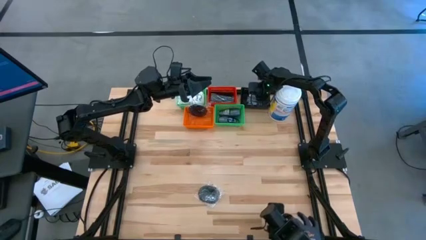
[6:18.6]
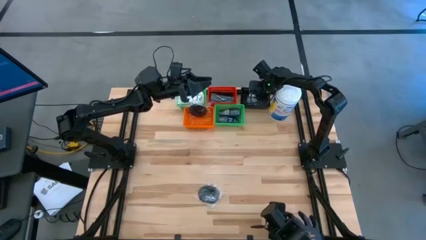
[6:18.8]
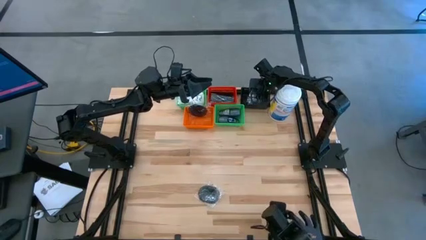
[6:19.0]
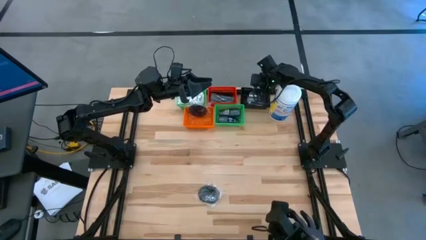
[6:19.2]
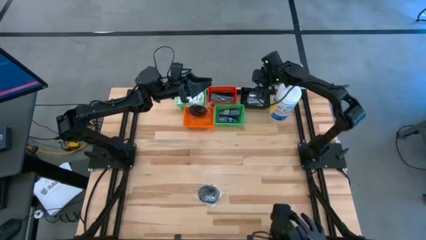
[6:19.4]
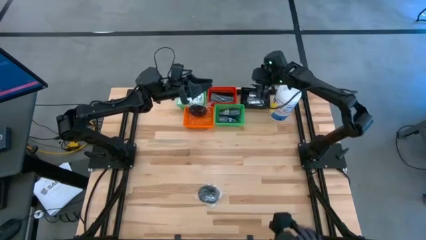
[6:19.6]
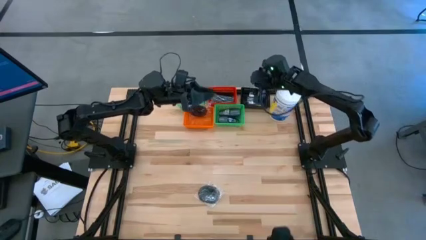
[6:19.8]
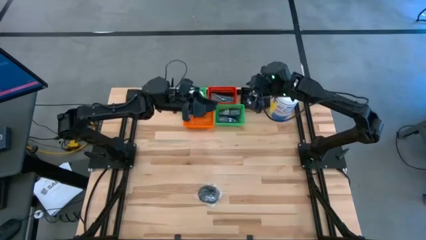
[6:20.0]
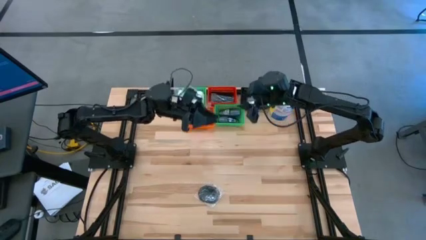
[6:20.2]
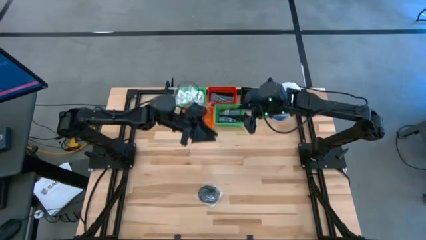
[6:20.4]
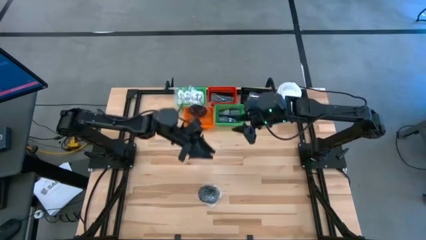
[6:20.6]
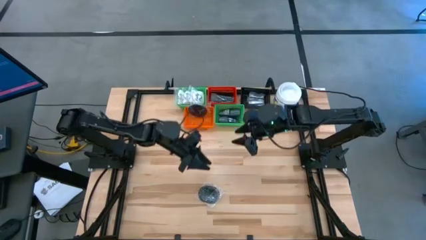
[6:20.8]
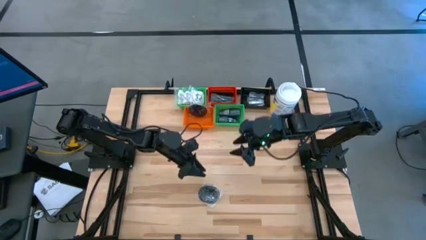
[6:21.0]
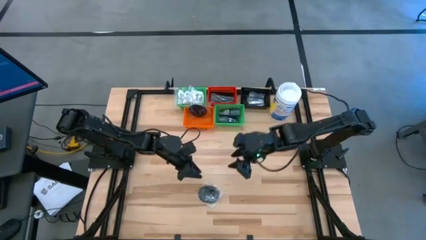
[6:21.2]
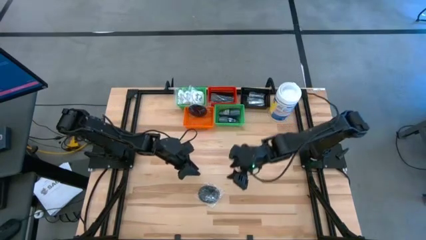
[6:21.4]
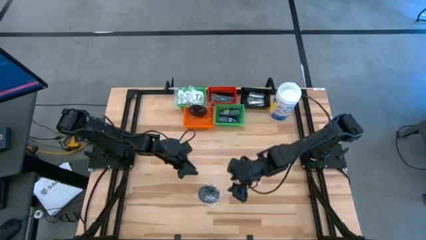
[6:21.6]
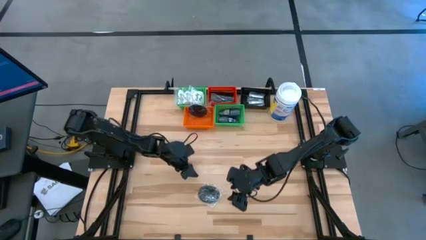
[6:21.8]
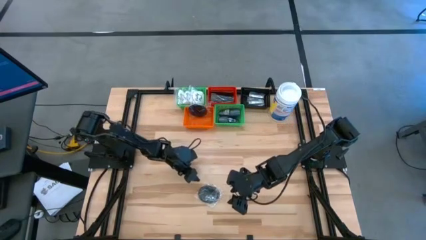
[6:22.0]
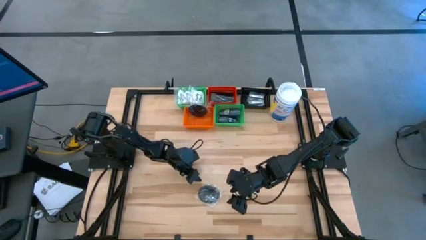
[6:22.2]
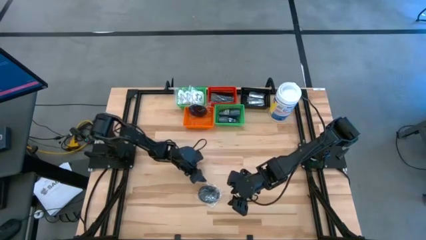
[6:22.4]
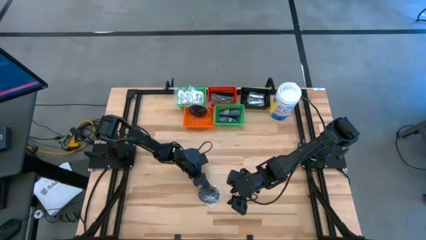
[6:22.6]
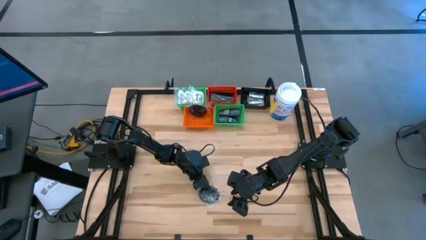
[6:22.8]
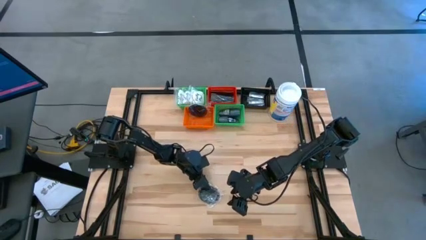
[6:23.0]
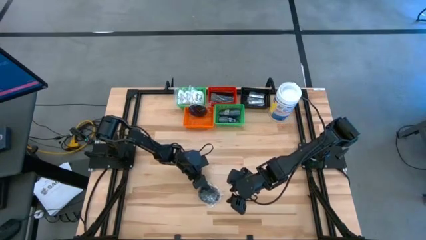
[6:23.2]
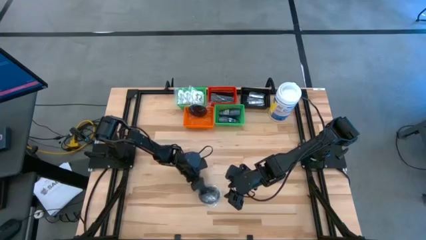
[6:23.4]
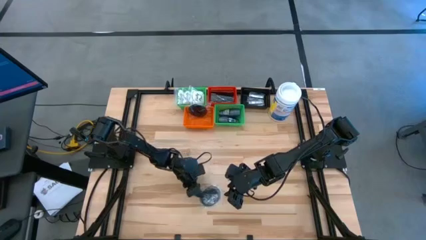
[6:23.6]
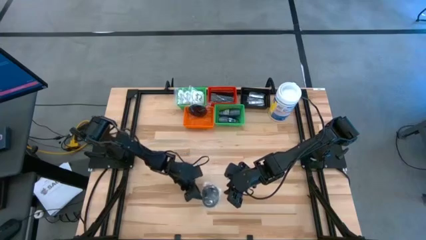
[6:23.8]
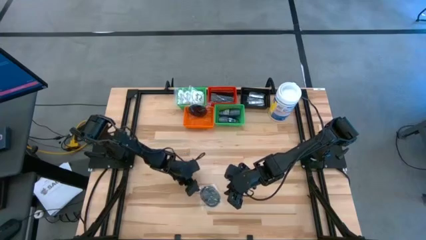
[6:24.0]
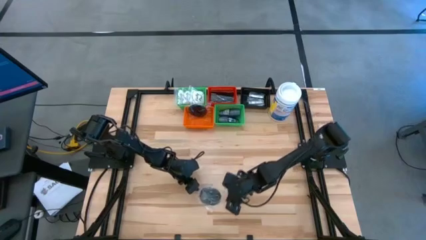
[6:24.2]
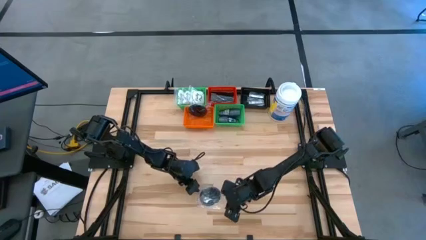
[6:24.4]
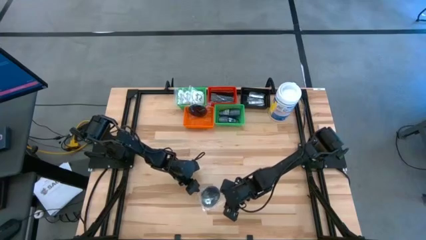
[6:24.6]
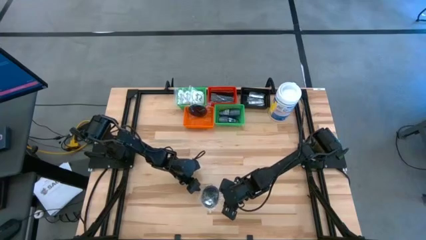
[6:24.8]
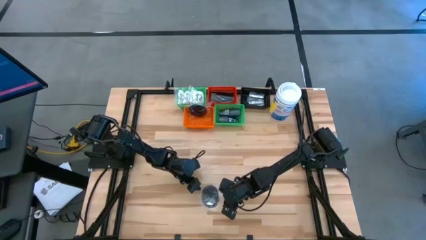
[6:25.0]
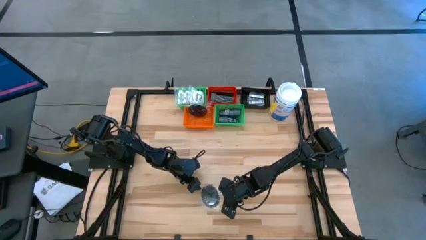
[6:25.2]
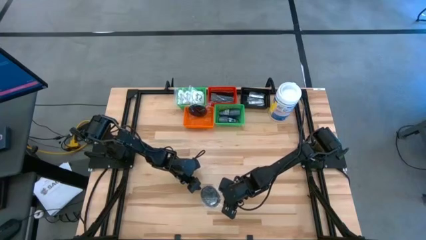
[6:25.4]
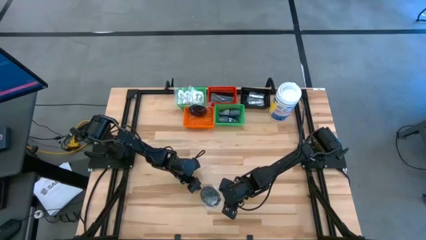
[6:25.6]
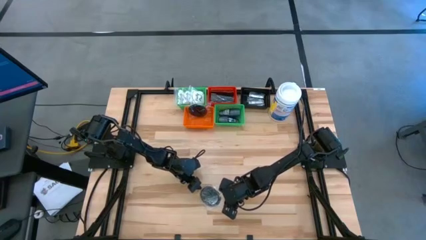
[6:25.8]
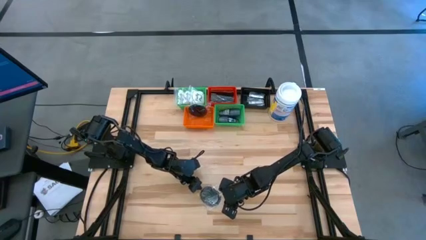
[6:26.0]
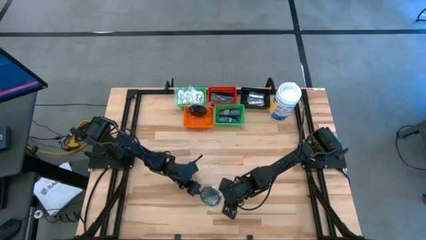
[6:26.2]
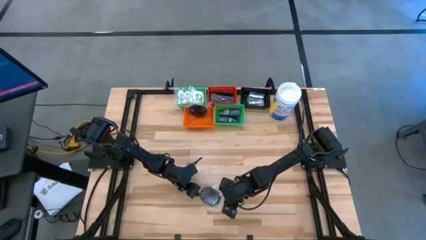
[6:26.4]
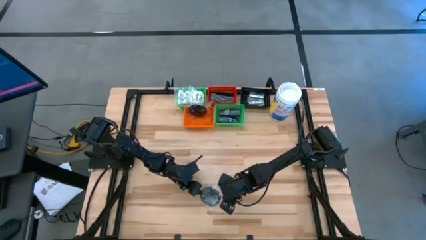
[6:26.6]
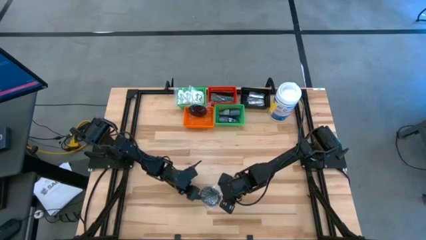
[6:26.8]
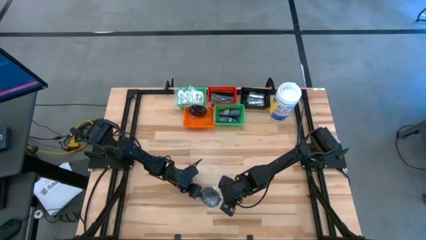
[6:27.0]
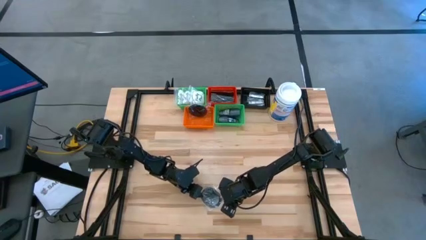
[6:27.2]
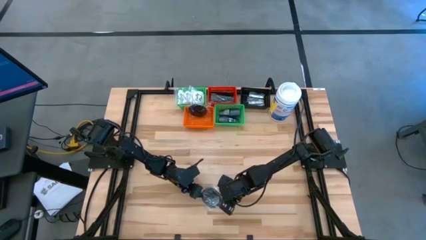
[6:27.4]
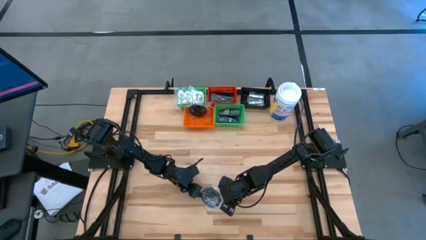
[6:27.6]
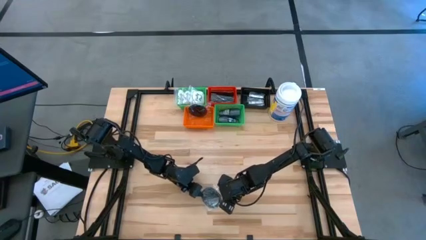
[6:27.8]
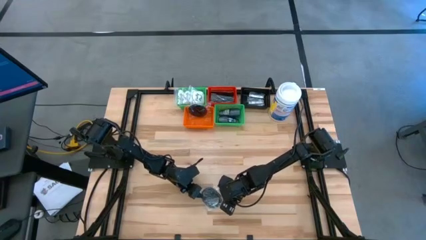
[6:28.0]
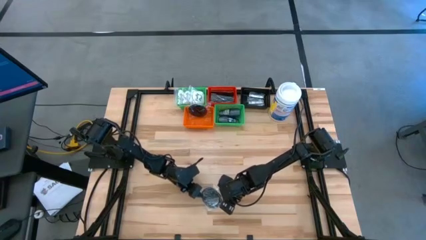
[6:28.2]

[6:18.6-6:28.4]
Task: Pick & Place Travel size toiletries
Put the black hair brush into the orange bin

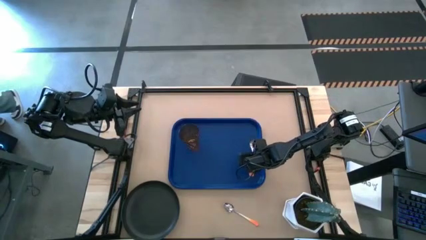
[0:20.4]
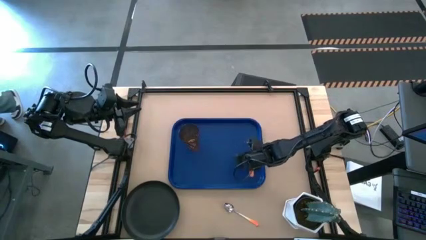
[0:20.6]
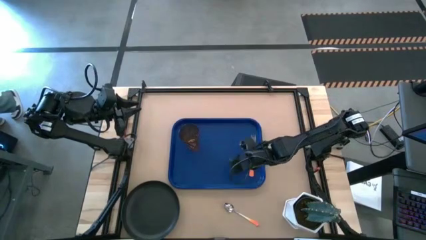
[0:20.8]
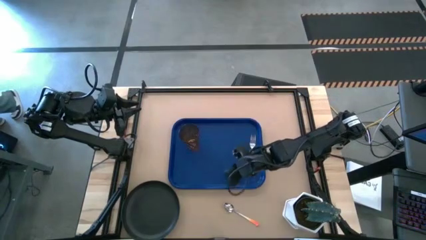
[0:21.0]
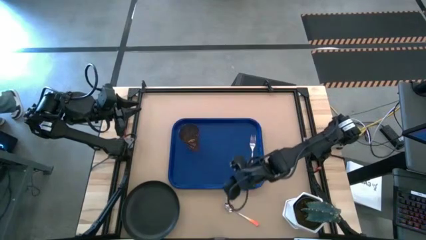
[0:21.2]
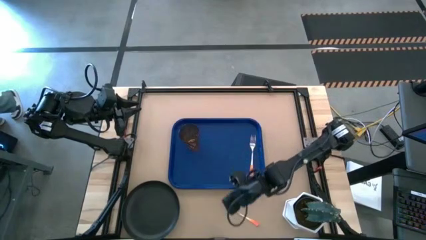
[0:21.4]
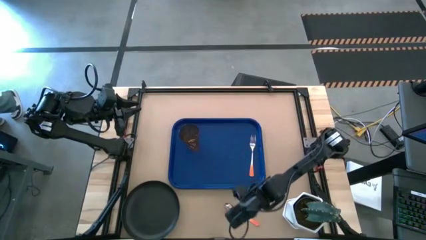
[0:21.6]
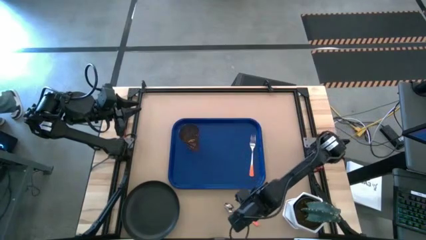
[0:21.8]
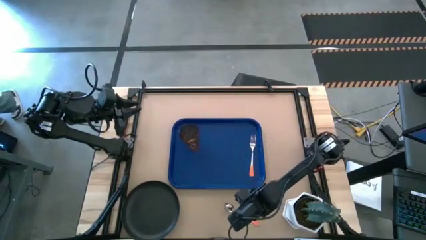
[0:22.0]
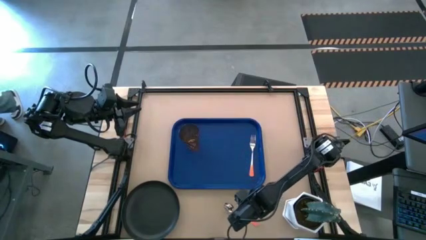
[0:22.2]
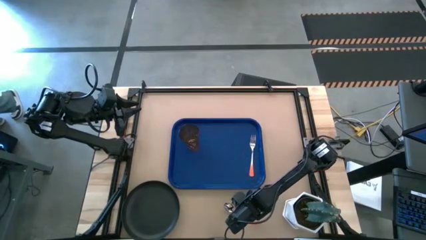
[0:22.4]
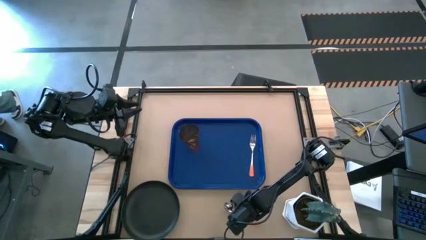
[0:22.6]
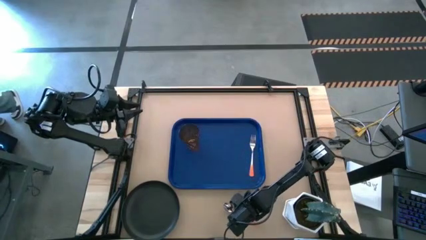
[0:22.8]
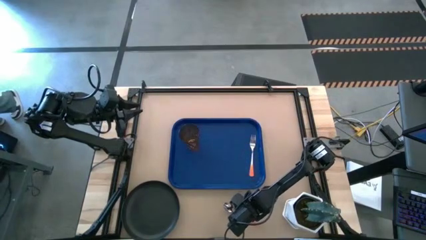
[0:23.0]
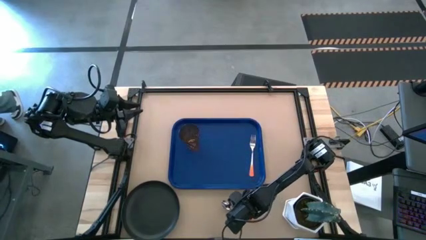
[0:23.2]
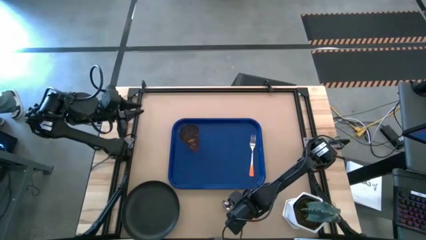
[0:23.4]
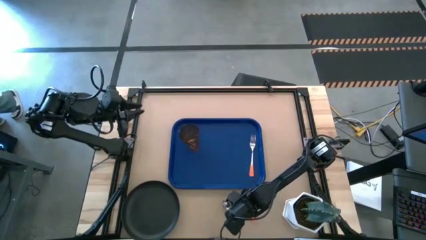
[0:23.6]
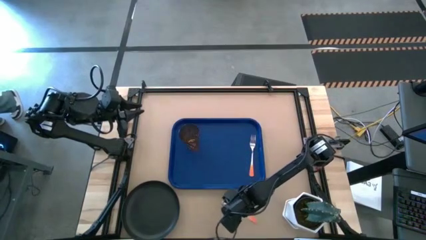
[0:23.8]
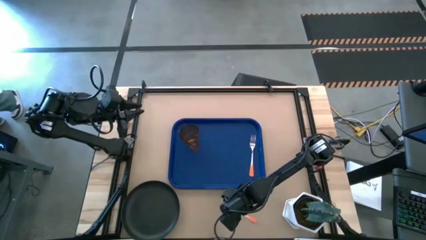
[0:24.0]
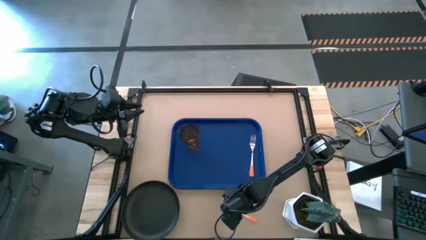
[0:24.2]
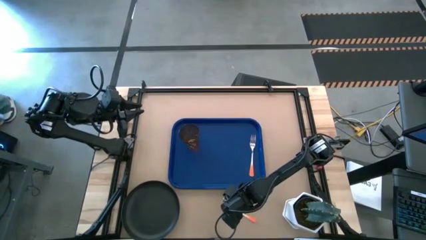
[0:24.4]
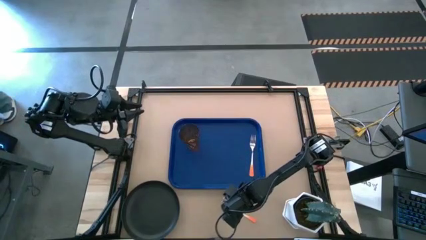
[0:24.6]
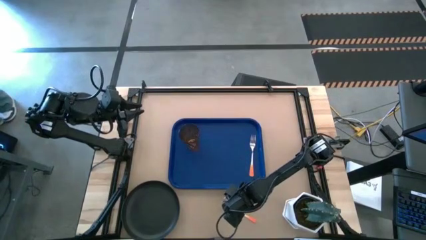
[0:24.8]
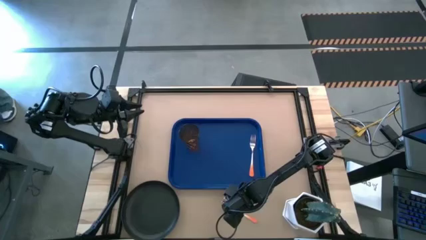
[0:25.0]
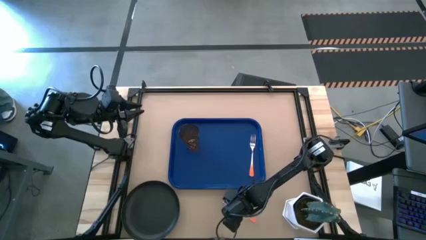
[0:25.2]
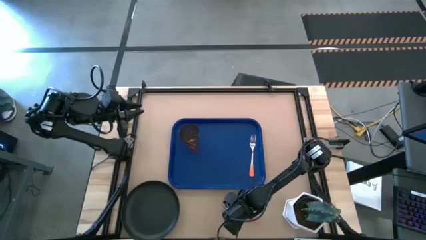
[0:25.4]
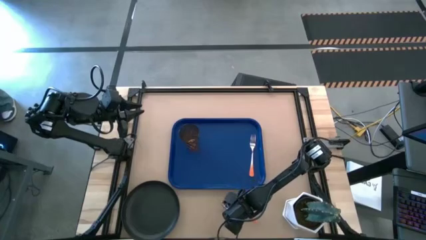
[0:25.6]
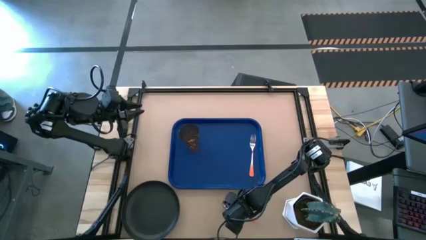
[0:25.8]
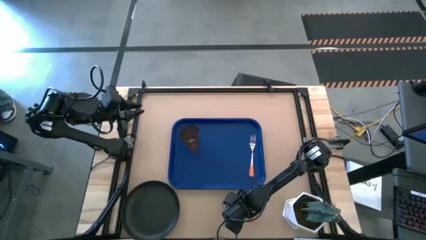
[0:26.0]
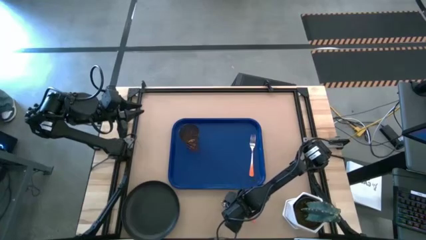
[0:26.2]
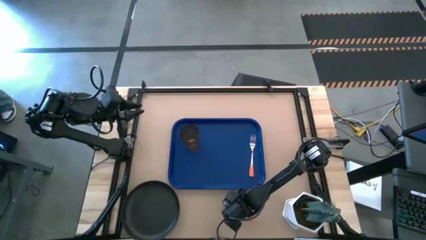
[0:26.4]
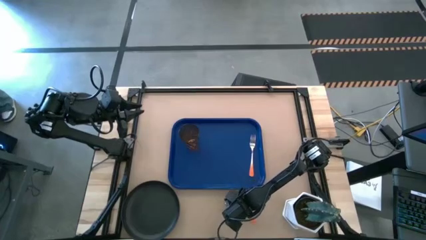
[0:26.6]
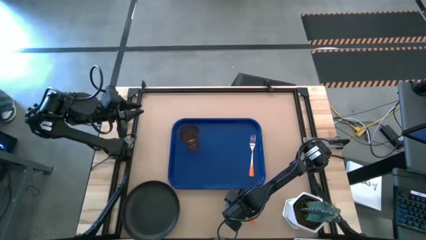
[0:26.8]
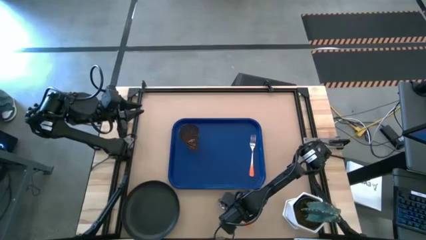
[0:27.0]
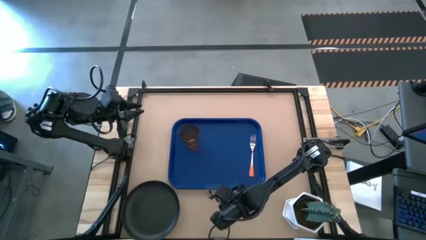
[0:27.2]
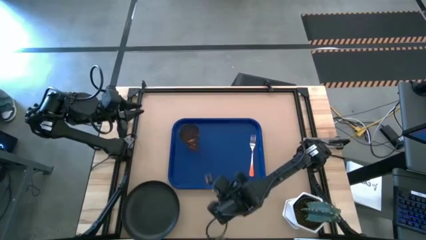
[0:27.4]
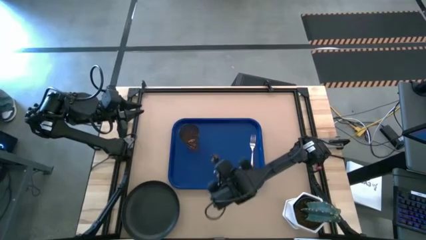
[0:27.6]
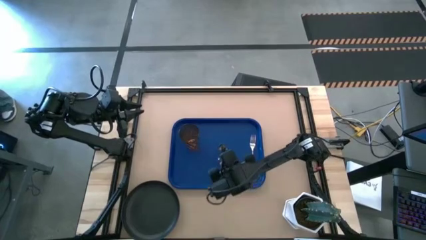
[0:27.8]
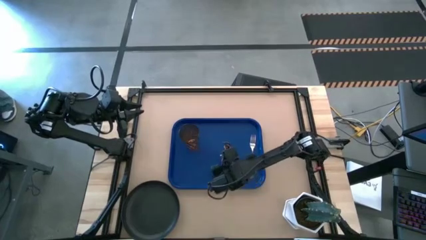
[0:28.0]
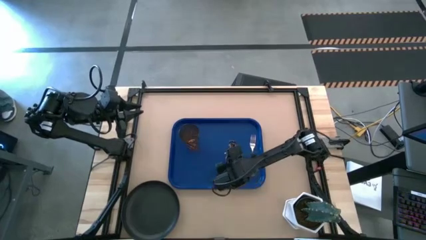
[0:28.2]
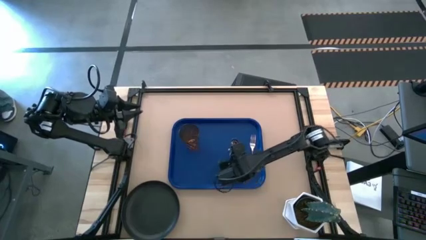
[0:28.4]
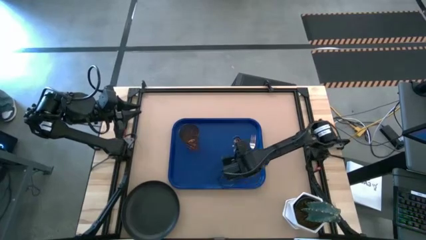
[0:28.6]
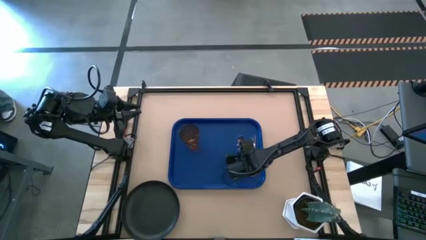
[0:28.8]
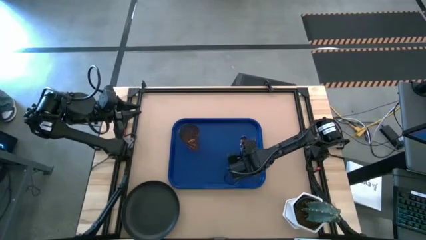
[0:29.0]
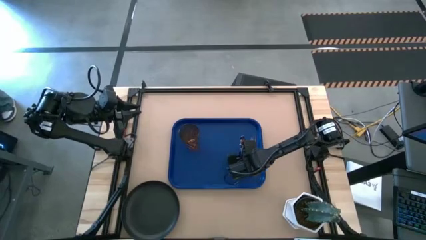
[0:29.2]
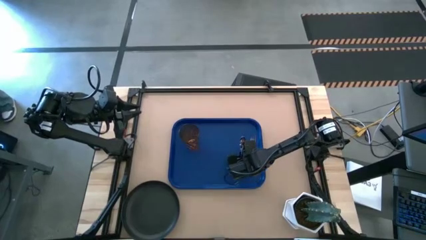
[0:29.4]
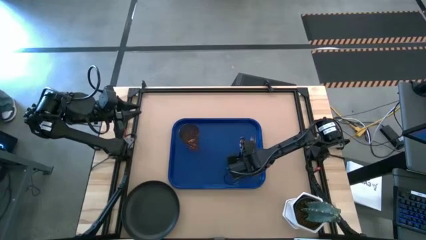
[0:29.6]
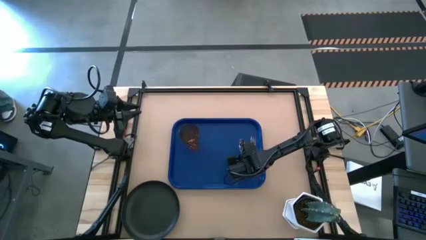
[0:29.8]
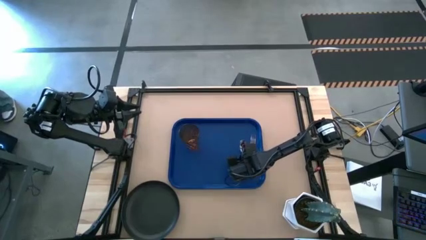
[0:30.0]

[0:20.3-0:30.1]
Task: Pick and place plate/cup/fork/spoon on tray
Put the spoon beside the fork on the blue tray
